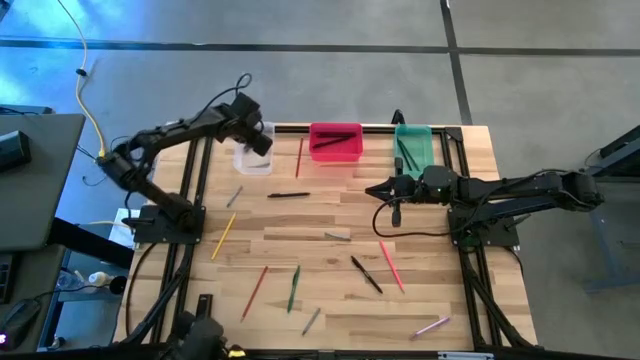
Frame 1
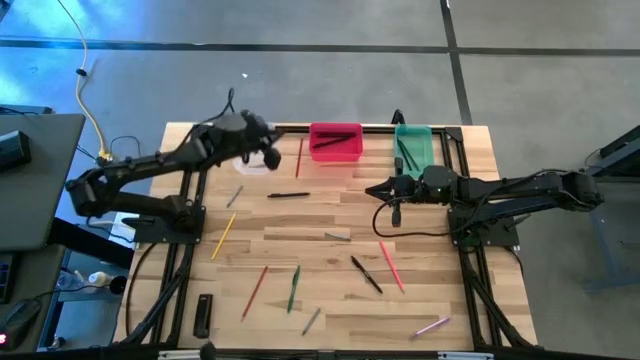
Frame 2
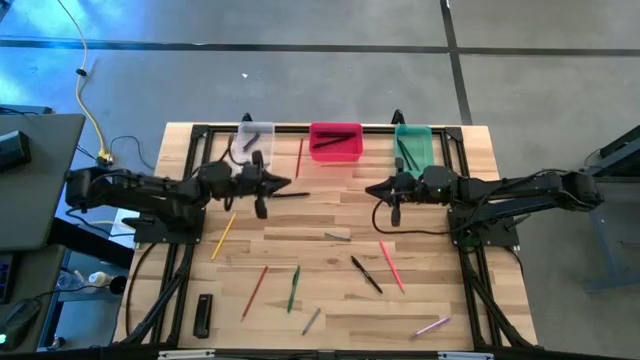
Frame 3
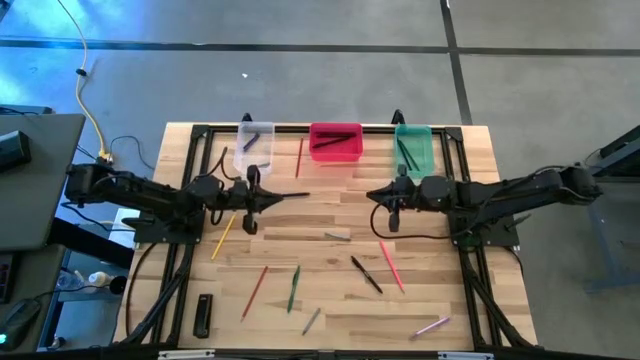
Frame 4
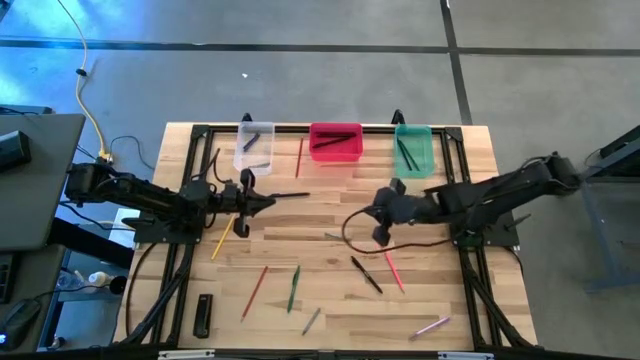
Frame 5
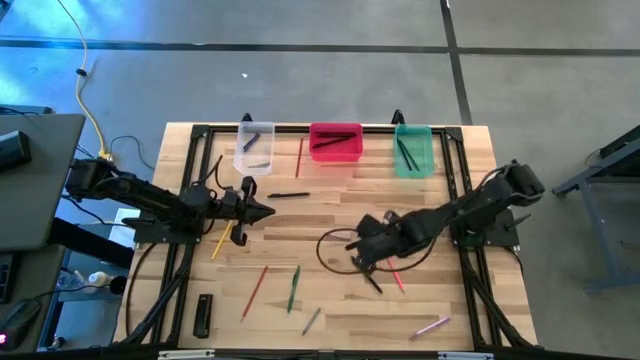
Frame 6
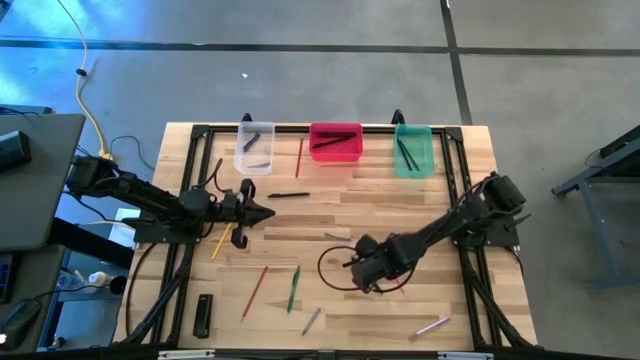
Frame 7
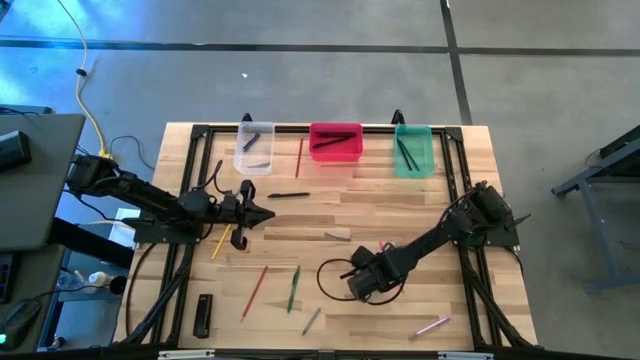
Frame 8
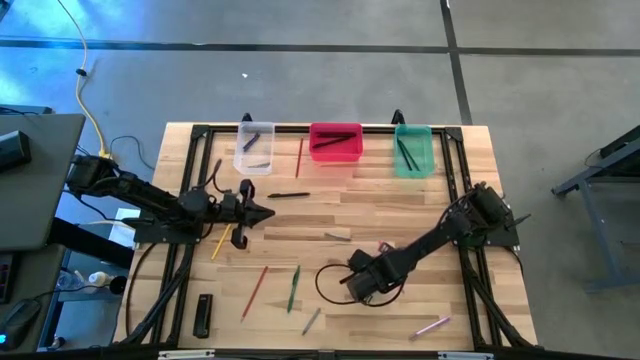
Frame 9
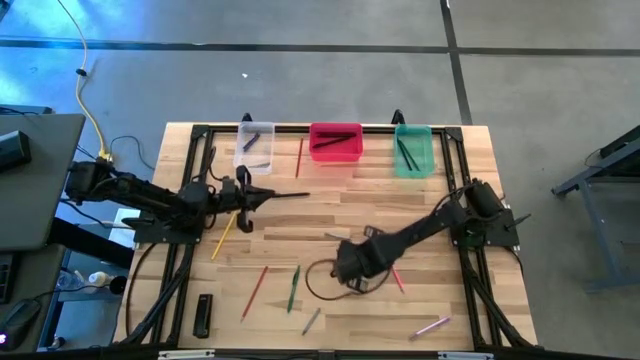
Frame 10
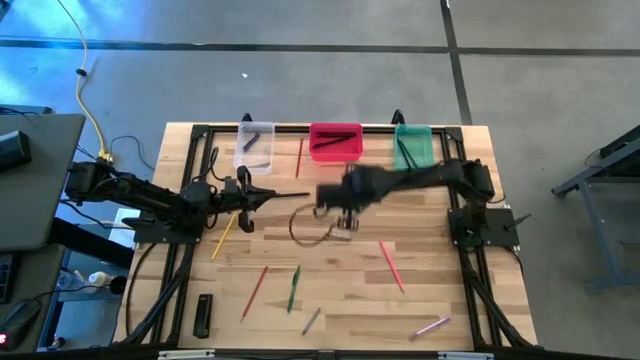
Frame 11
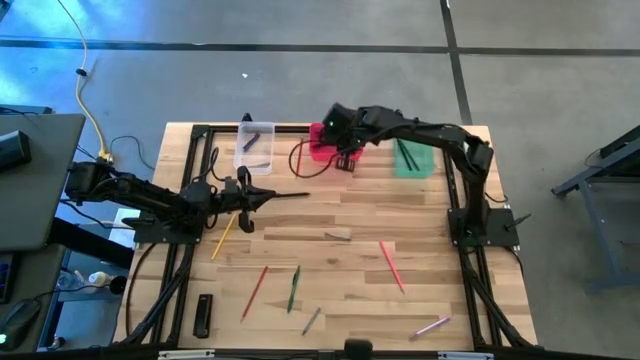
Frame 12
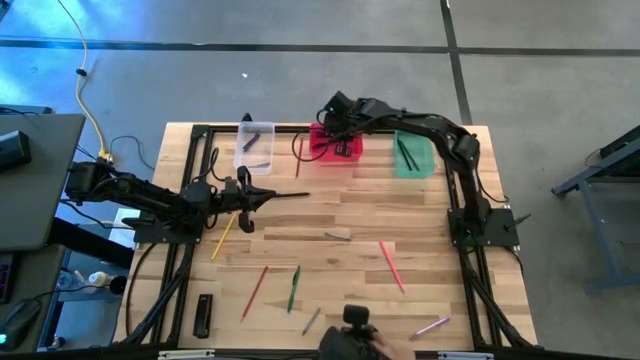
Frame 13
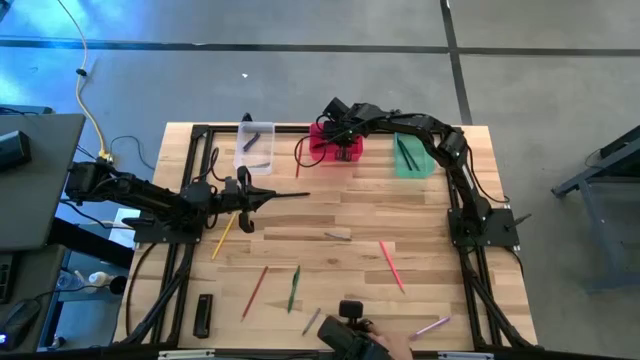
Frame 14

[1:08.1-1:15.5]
Task: Sort crayons/erasers/pens/pencils in bins
Put the black pen into the red bin

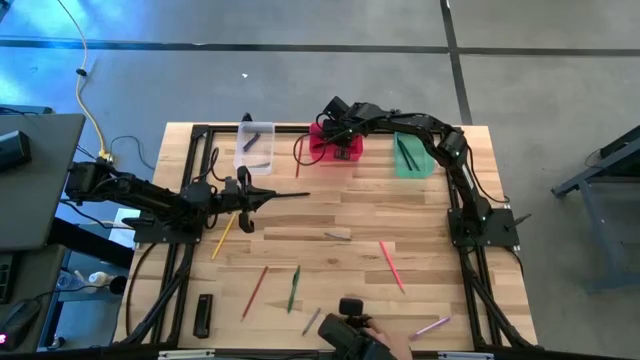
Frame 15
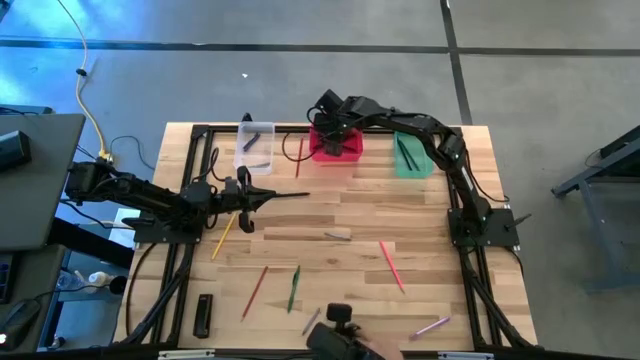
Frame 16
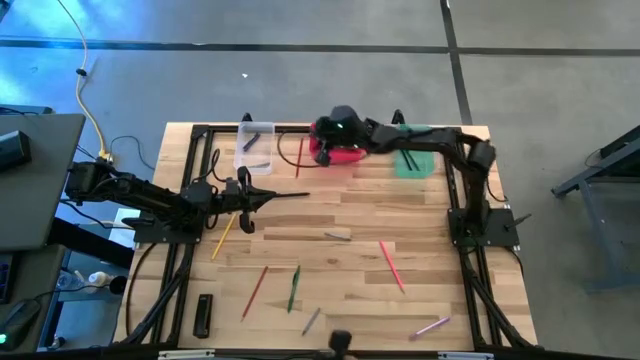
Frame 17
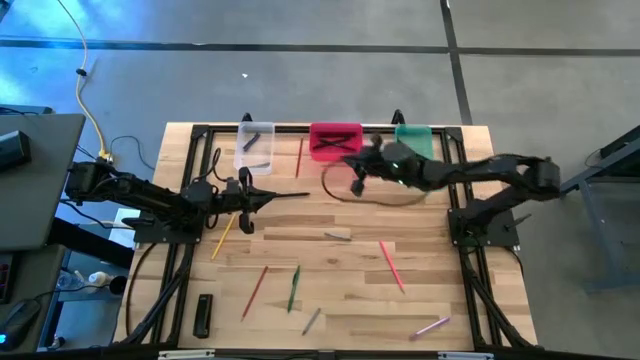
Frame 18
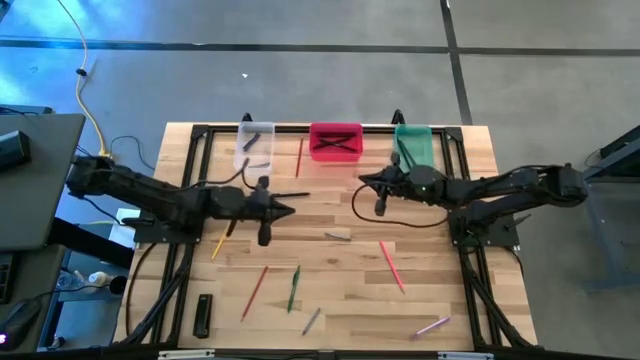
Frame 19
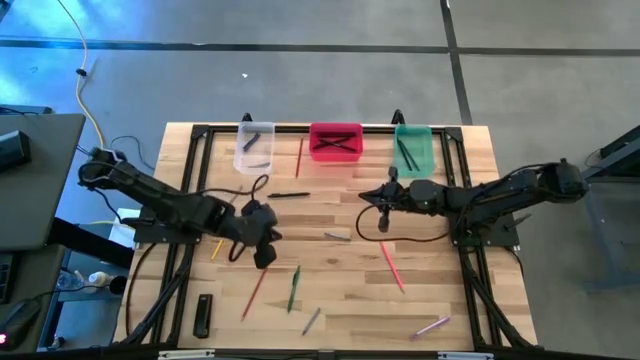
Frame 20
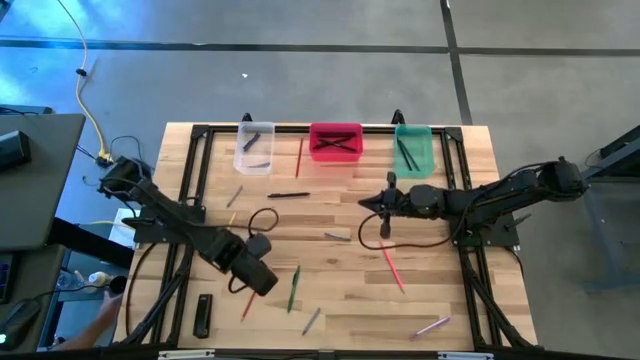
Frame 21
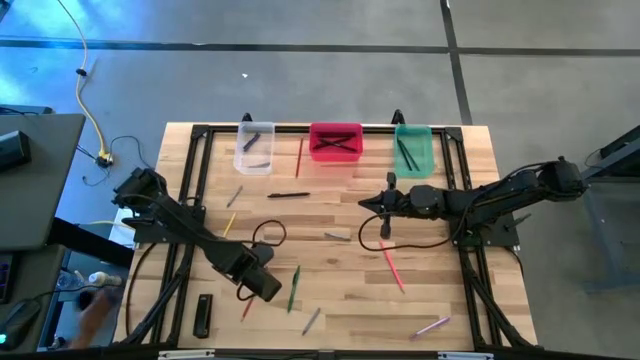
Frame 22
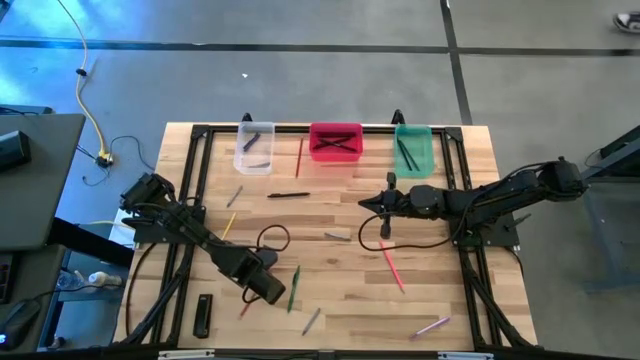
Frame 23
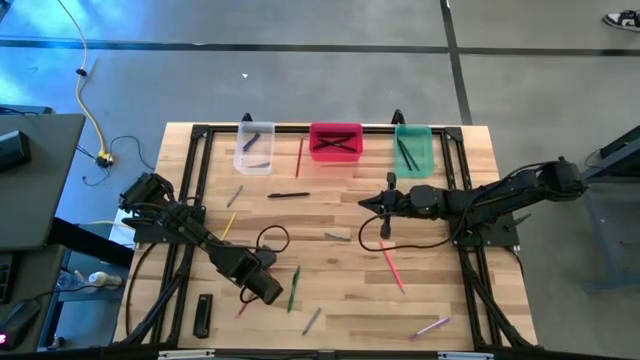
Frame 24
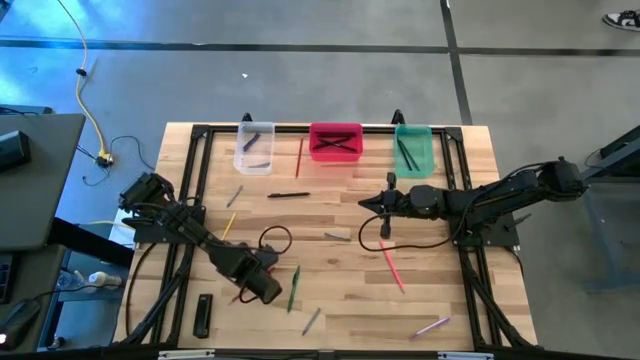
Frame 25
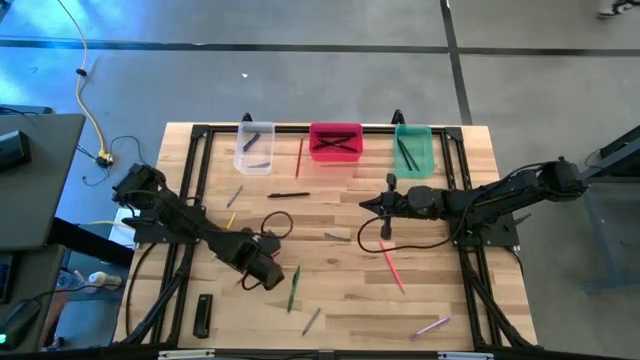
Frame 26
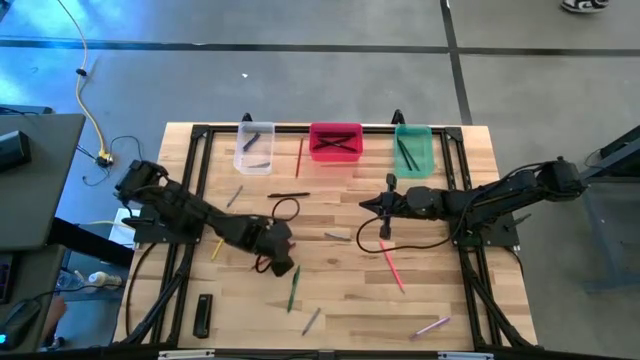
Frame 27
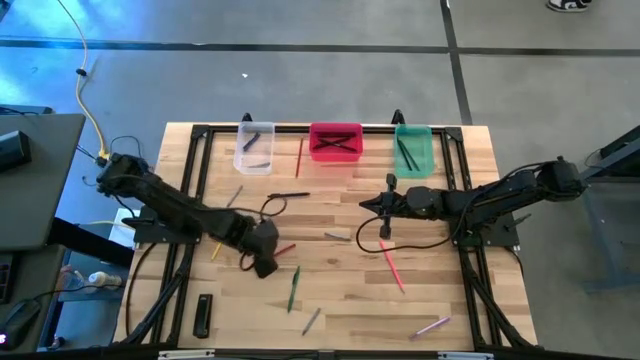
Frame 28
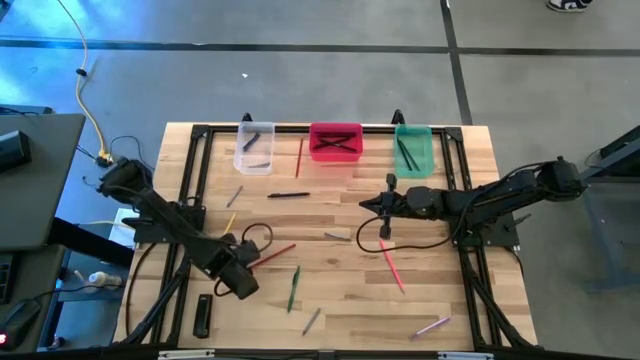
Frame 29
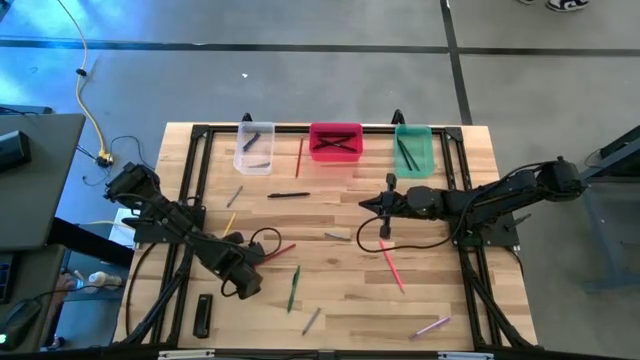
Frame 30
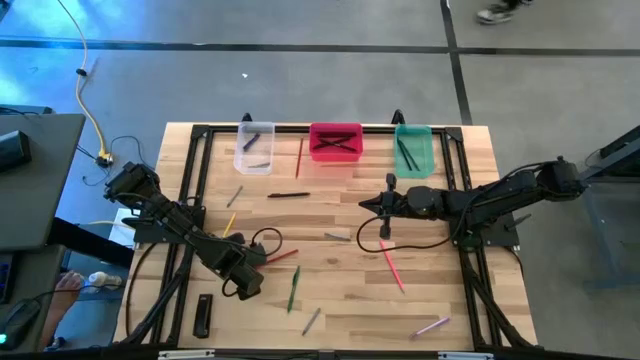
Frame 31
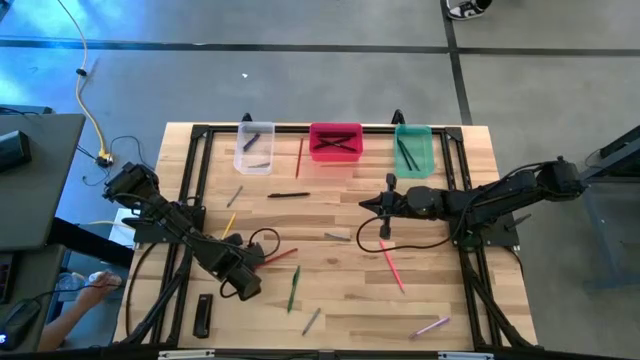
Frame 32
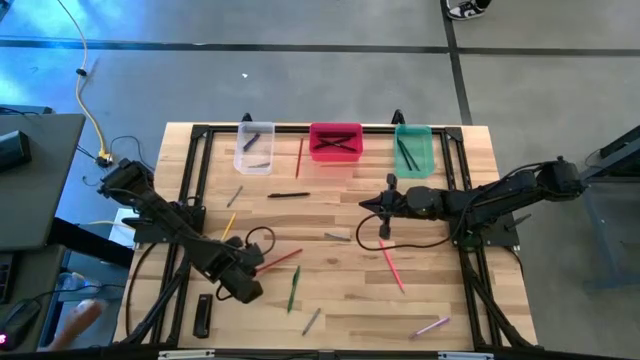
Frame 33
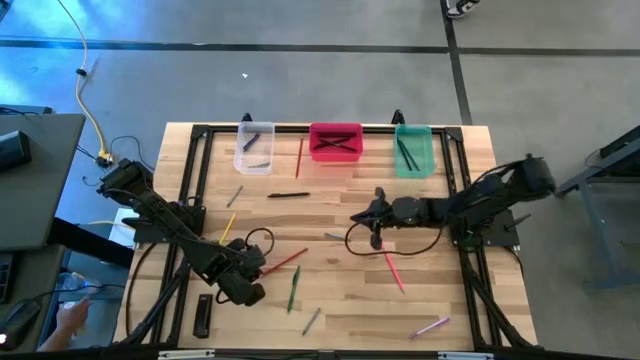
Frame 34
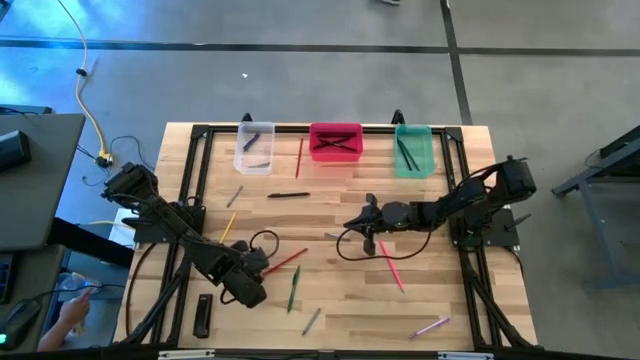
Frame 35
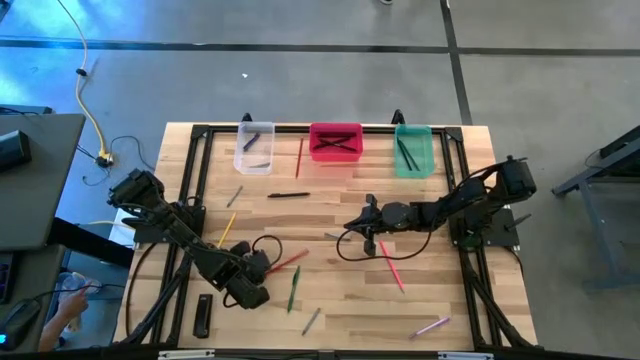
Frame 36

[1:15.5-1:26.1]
Put the bottom red pencil into the blue bin

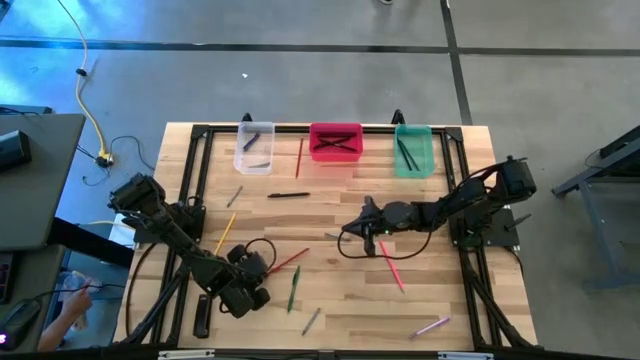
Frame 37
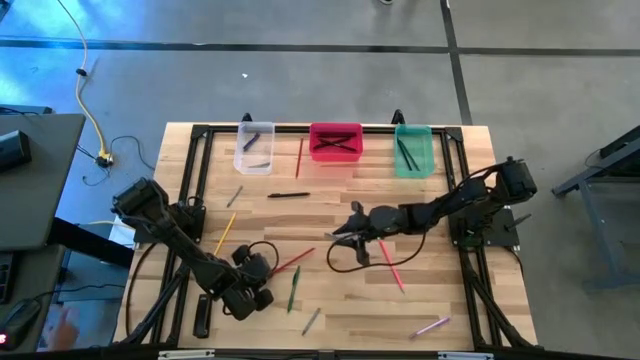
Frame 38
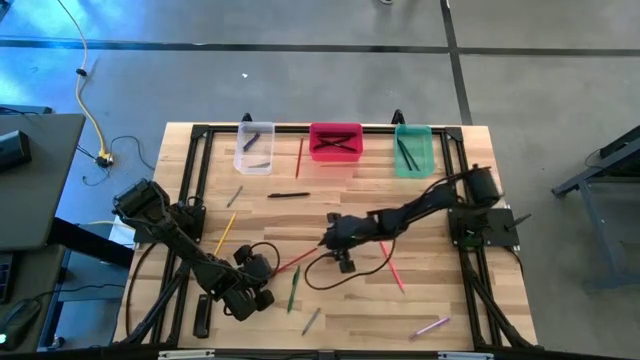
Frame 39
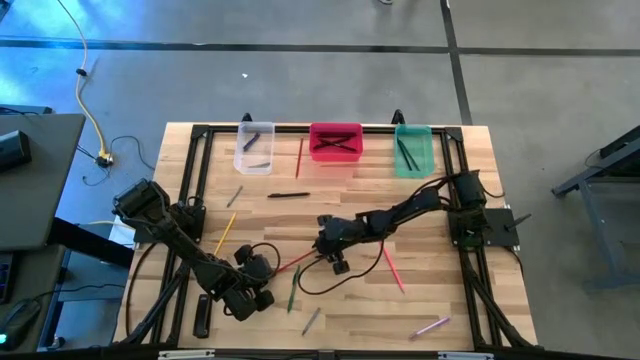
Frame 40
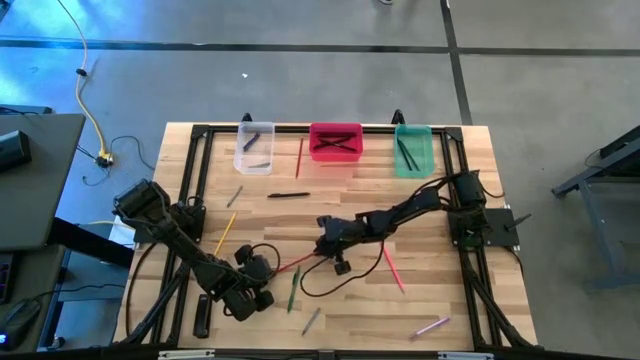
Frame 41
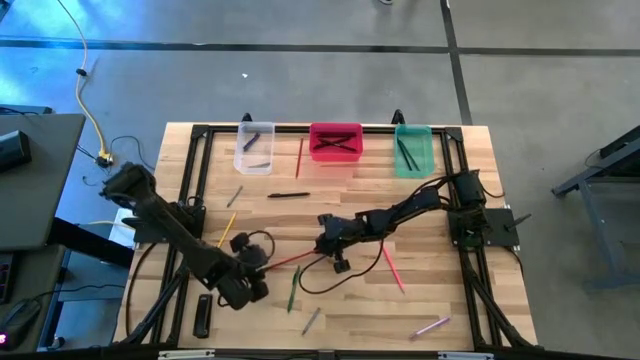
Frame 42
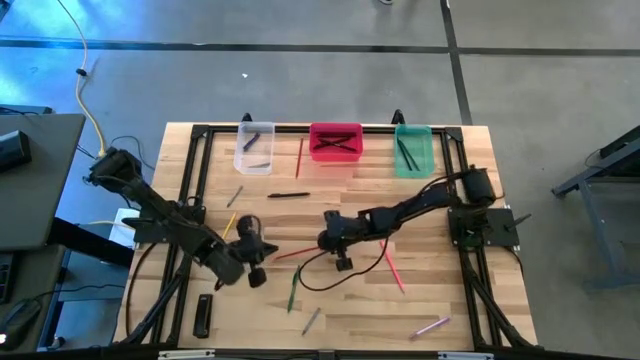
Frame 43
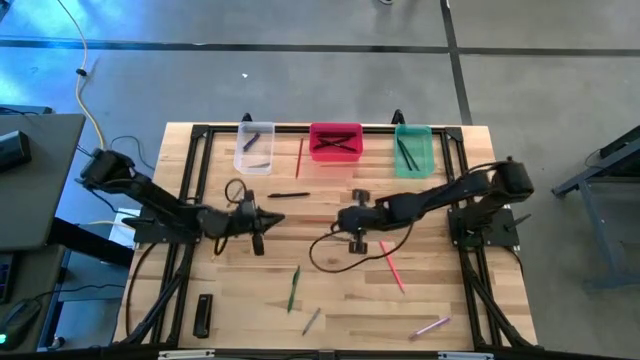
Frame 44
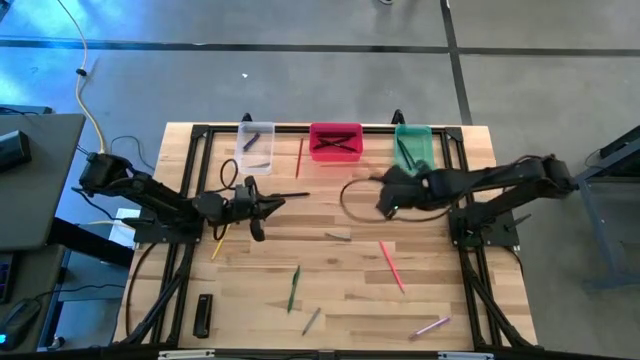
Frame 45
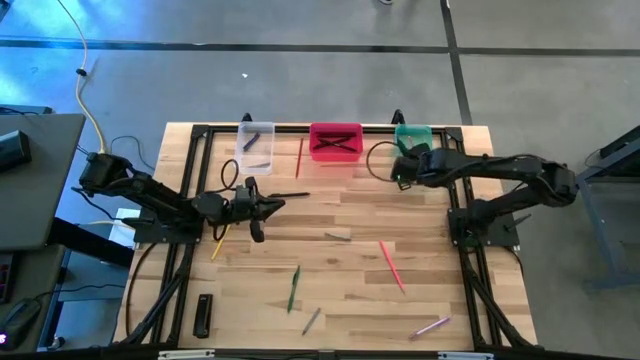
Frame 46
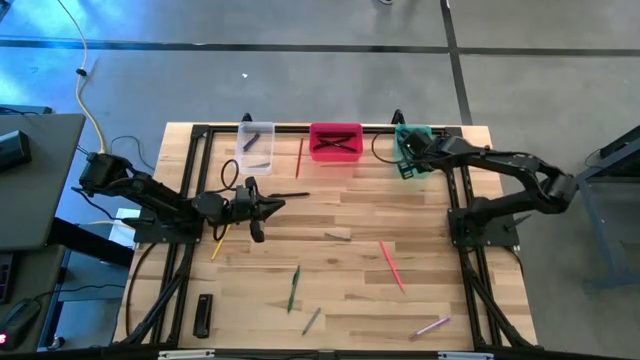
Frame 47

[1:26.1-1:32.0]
Put the red pencil into the blue bin
